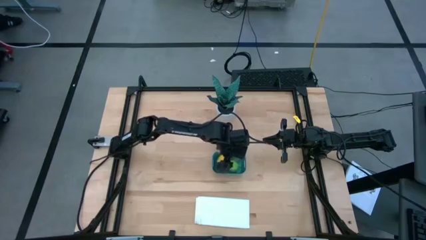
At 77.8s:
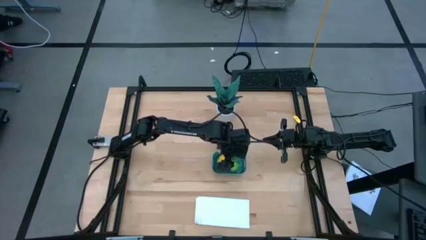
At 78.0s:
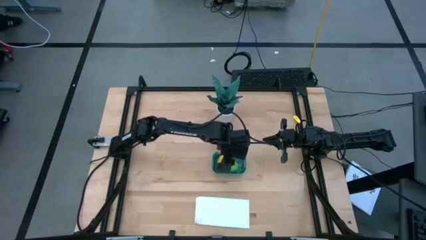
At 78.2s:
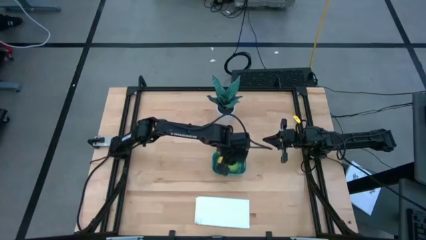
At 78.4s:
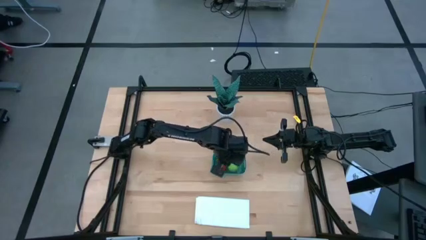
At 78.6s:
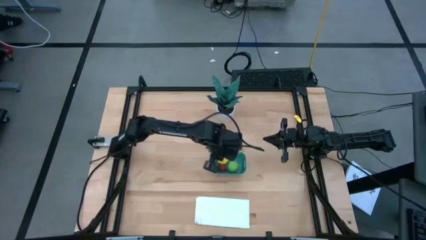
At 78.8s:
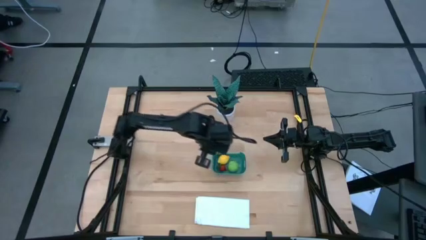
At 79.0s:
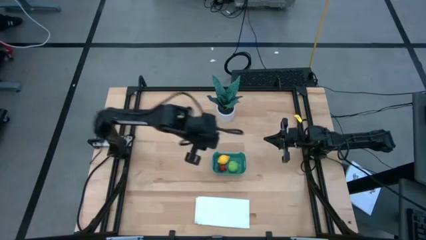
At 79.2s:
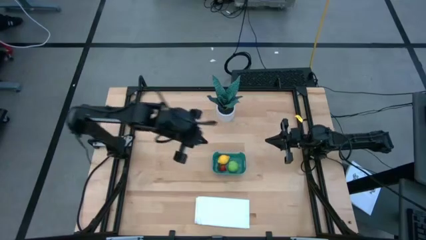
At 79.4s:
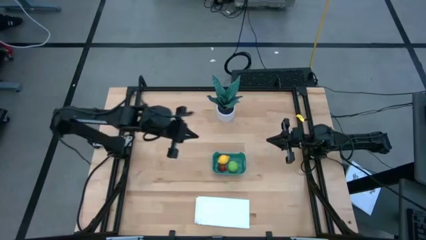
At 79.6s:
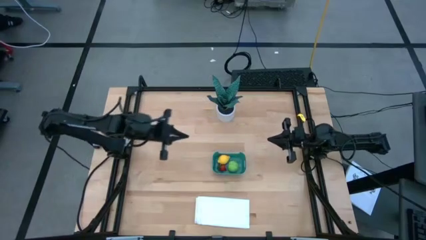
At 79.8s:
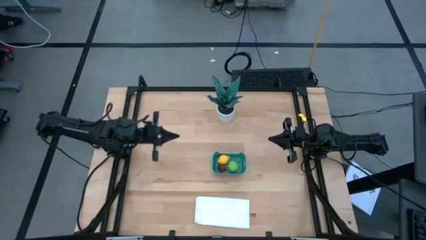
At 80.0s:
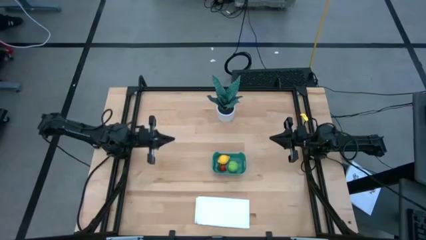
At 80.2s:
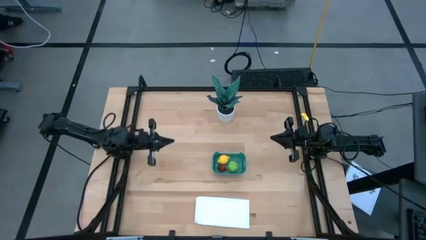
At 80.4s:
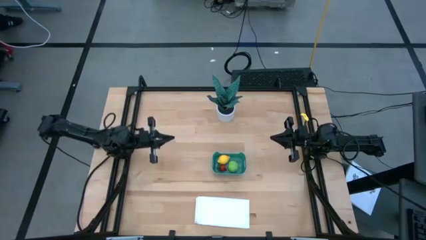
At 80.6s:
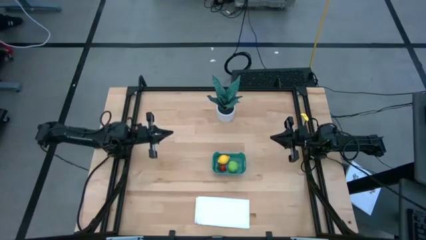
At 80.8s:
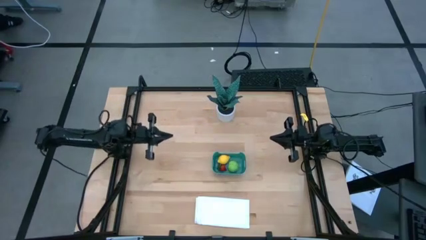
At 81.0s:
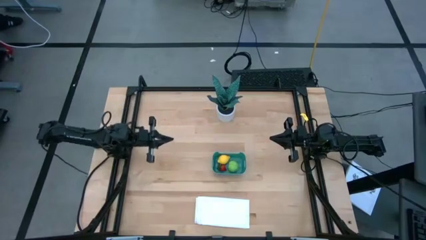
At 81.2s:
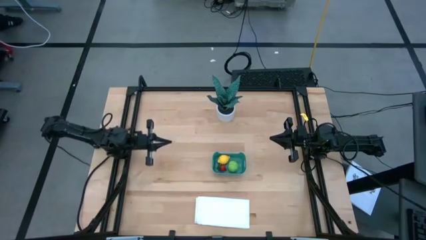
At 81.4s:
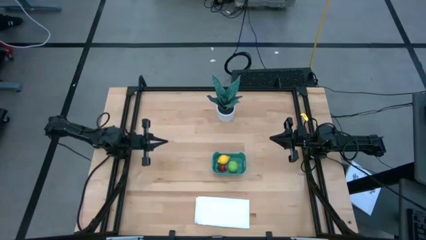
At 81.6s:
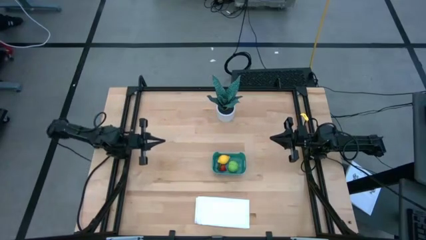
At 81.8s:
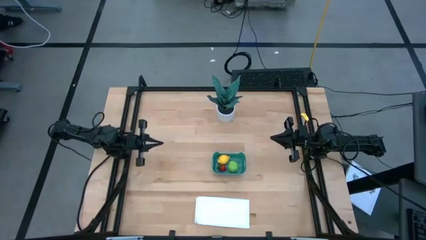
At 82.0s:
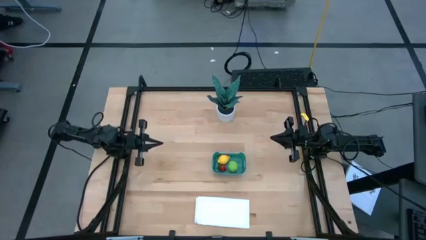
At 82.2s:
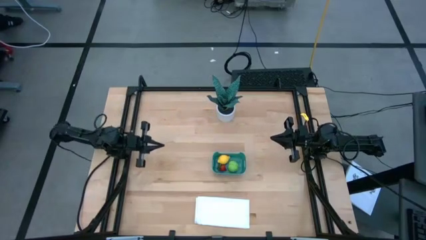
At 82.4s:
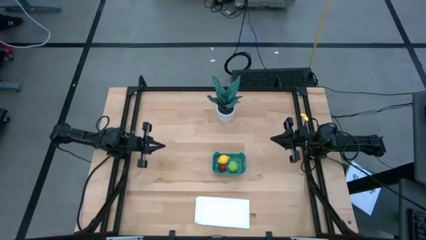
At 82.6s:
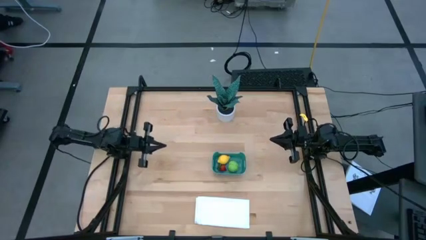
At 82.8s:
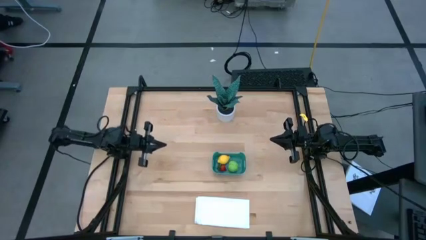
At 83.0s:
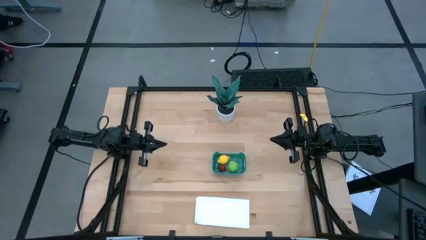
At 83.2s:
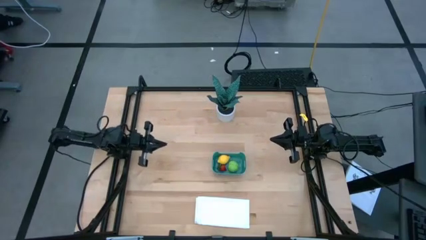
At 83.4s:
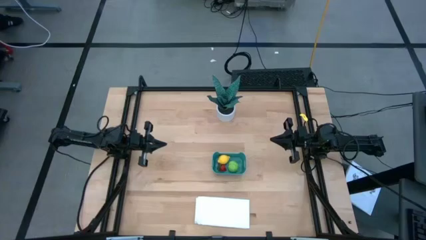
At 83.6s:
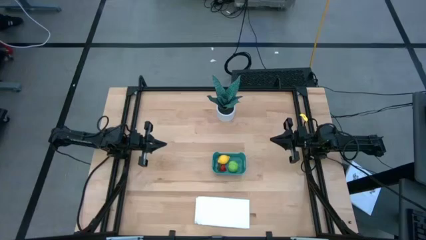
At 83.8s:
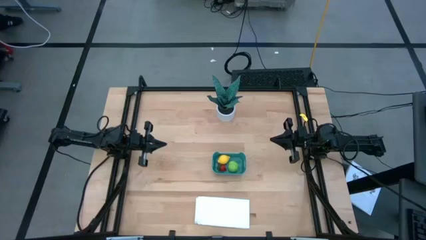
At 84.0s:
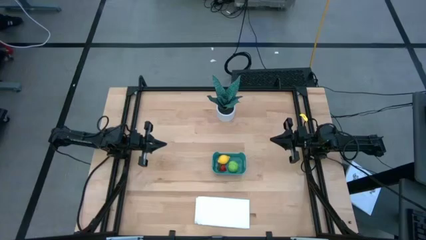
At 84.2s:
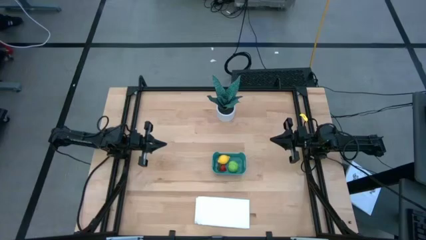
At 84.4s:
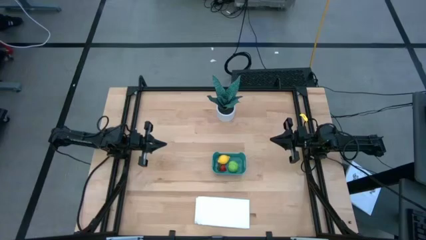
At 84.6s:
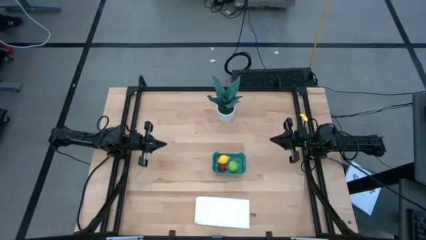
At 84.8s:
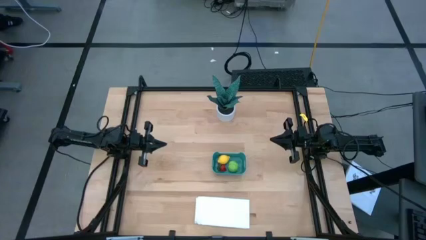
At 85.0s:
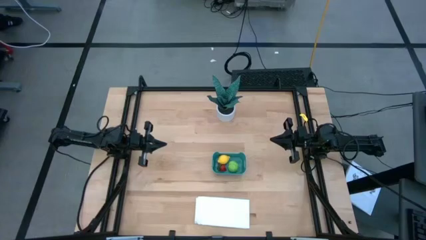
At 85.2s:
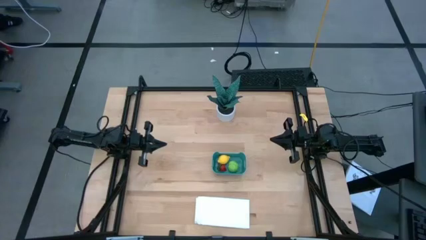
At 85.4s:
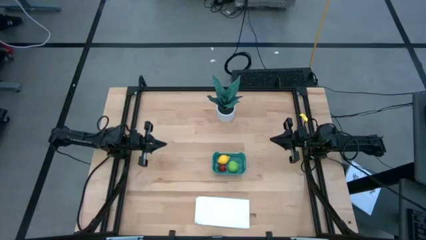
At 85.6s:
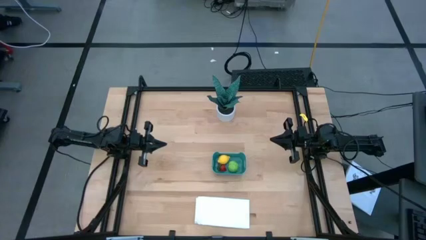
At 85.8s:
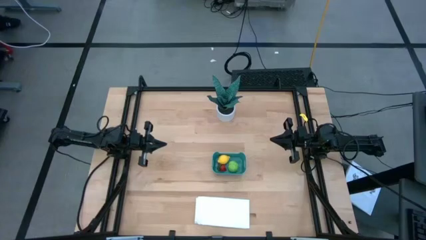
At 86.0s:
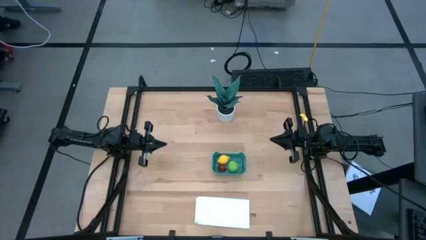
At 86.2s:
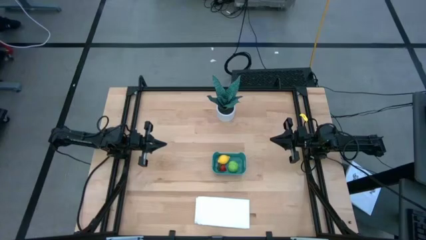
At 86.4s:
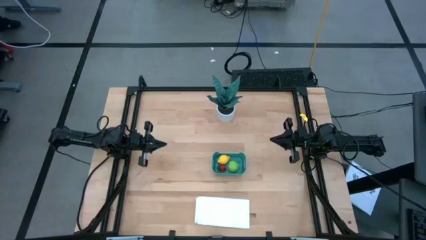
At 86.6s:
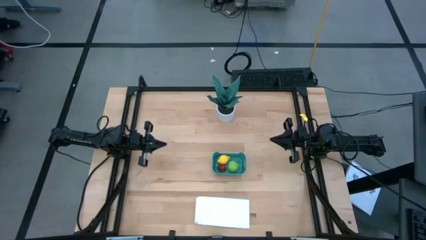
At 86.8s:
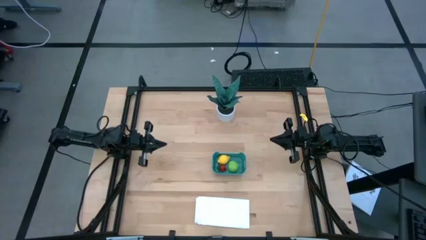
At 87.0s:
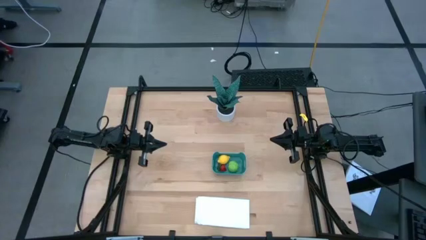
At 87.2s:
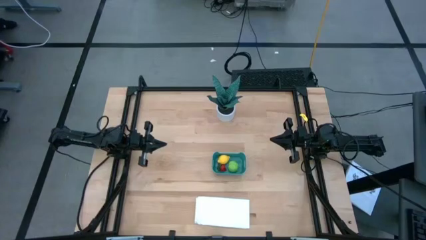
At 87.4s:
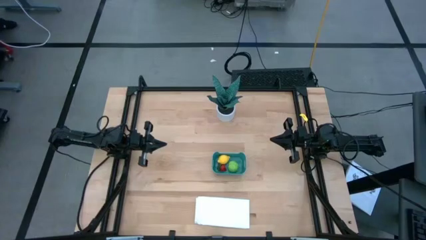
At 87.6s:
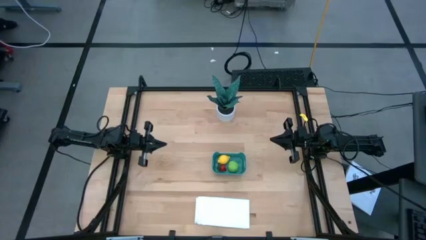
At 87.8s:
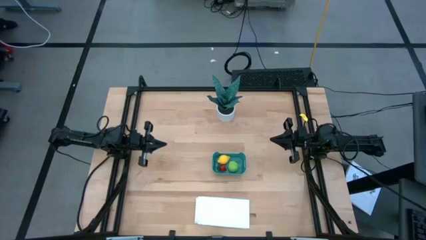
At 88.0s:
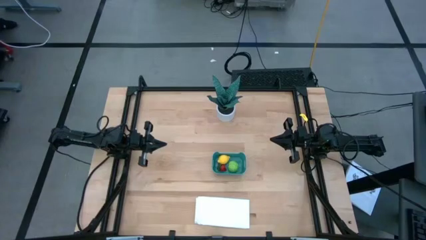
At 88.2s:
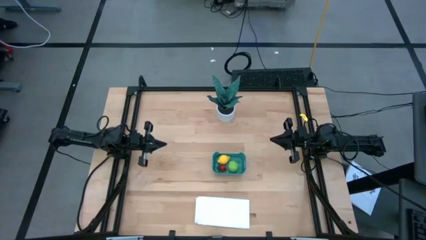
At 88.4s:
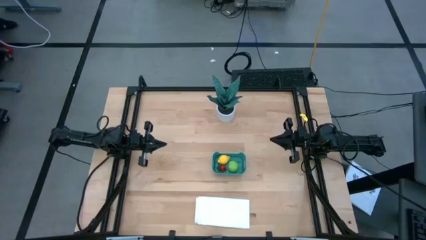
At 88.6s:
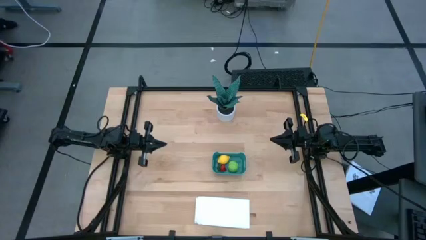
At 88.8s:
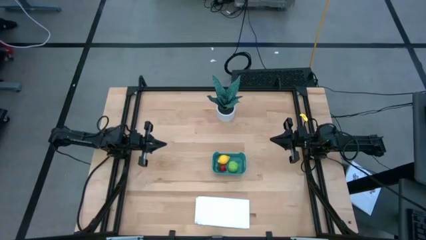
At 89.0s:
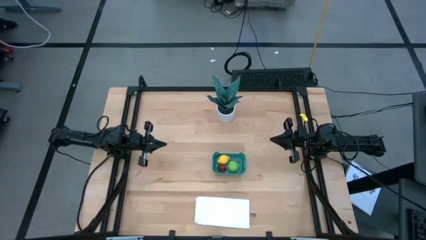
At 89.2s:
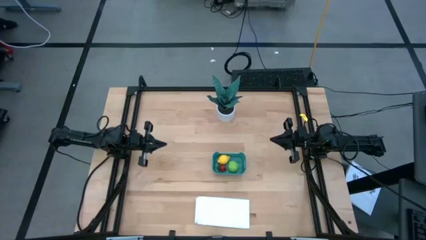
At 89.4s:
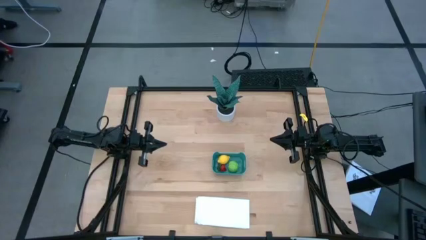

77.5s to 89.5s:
Task: Pick and placing Produce into tupperware
Return To Home Position

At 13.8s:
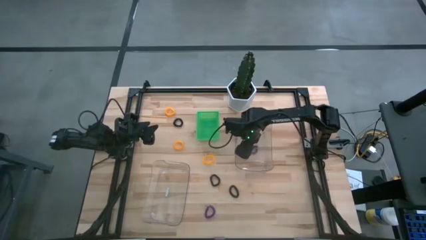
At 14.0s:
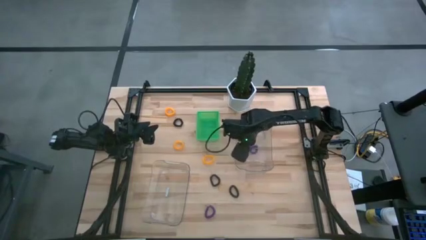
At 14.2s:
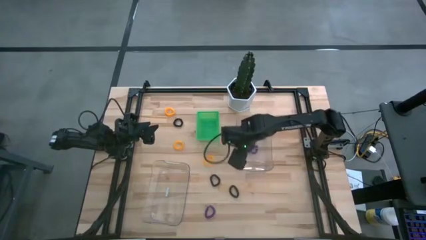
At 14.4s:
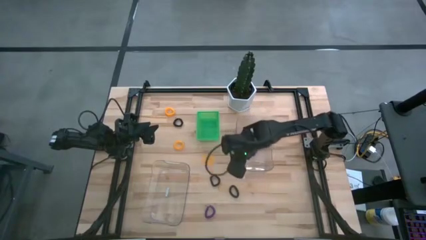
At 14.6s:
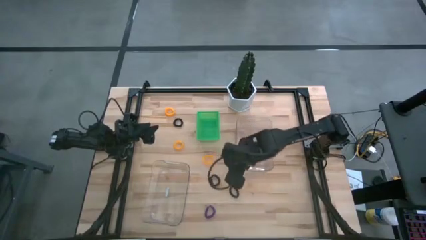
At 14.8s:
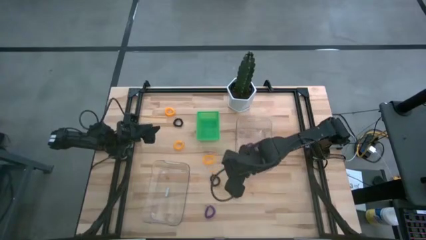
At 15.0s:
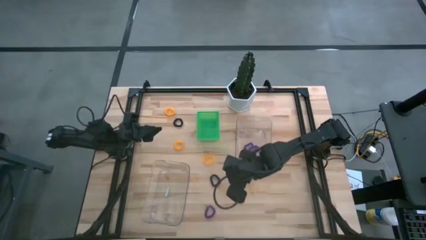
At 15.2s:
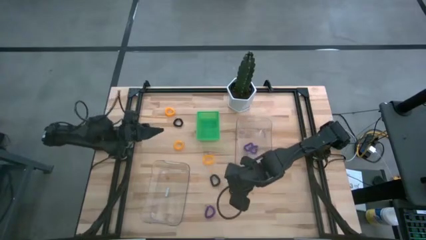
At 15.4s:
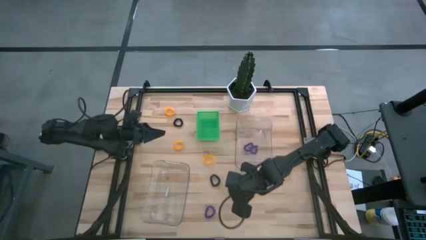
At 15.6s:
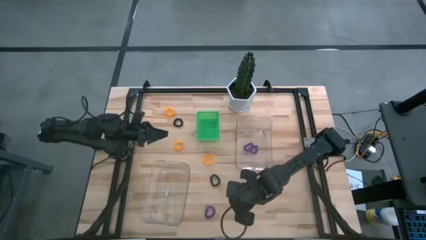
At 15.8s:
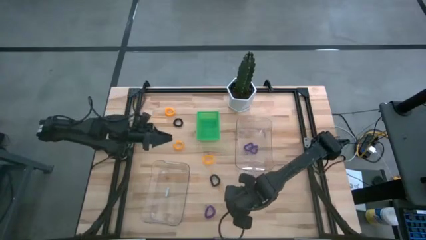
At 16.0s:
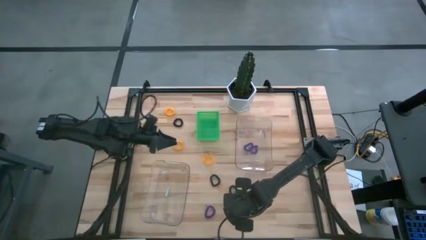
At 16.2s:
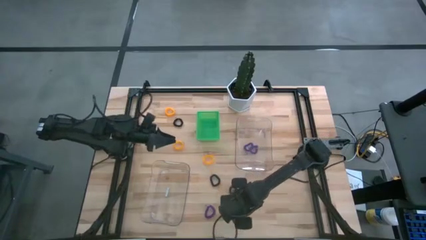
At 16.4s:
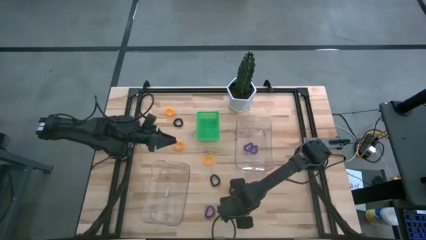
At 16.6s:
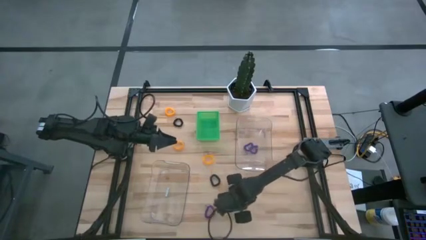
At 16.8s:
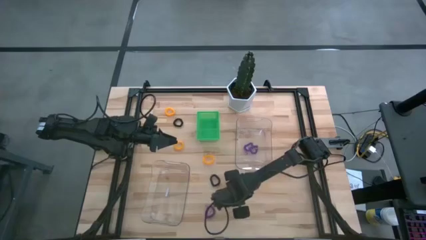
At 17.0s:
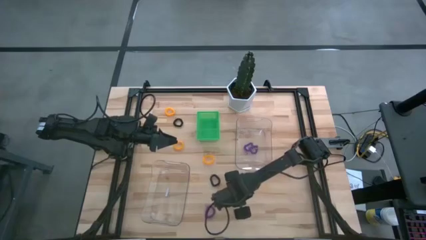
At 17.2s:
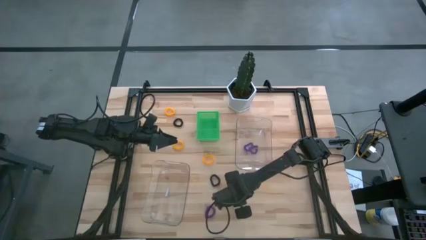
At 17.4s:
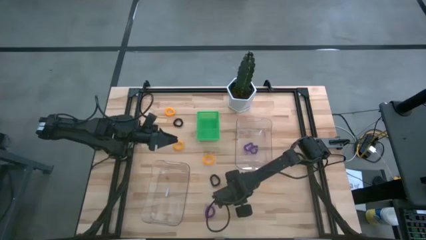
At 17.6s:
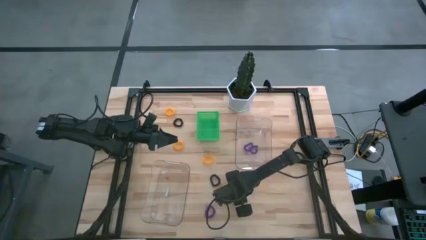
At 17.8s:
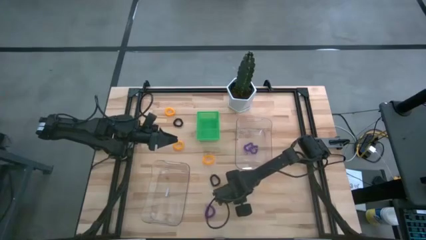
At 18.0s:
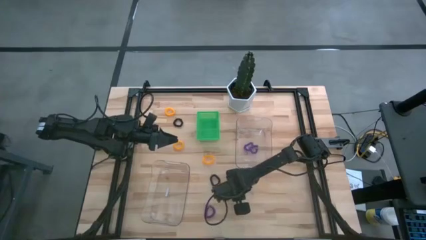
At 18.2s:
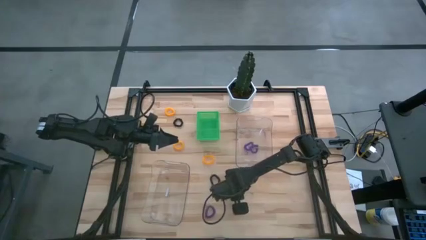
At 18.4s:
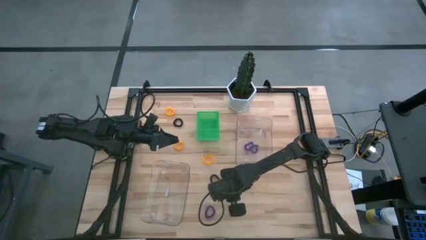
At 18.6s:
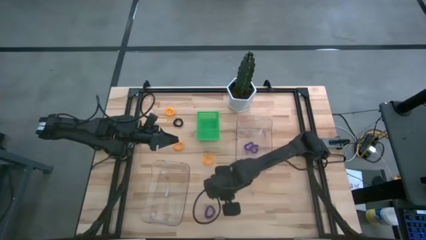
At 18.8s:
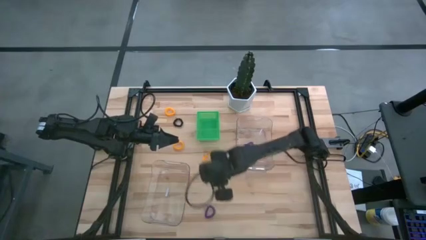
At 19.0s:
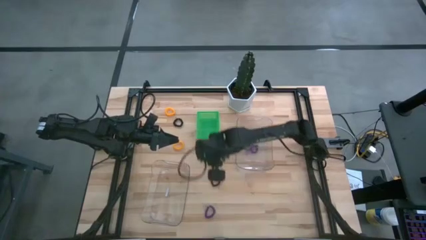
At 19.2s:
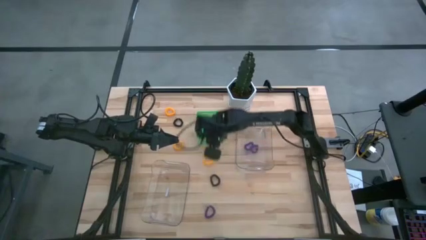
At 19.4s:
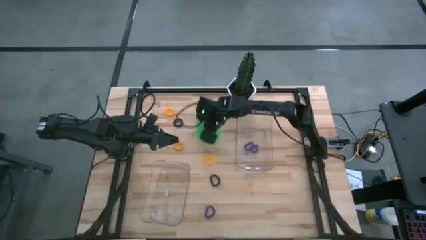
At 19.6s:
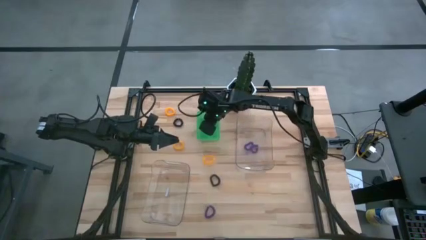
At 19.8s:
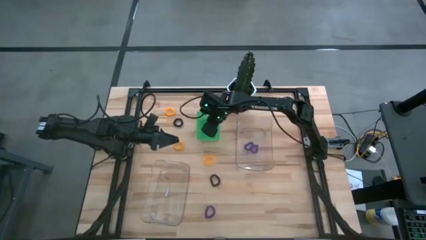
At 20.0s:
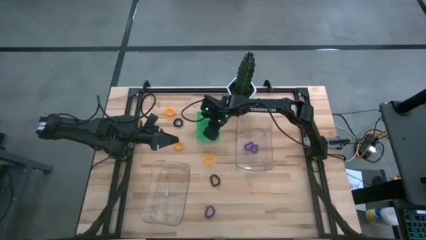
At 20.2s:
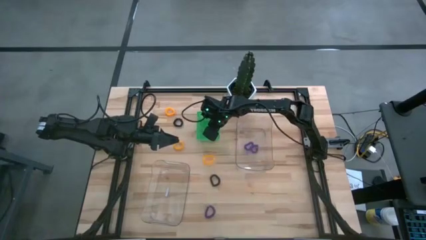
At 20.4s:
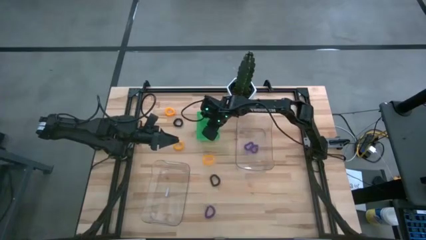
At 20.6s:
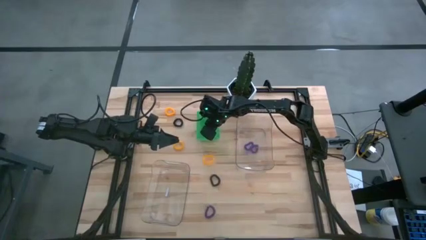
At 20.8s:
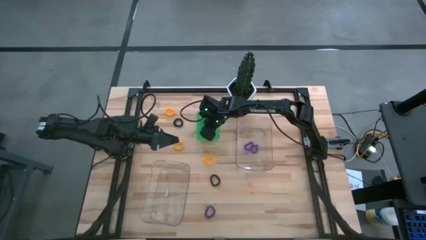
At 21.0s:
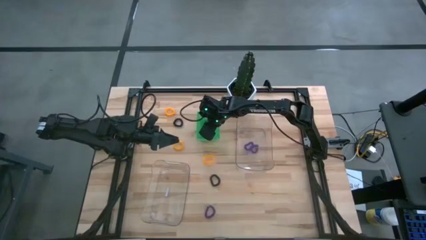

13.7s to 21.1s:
Task: Sort spring keychains
Put the black spring keychain into the green bin
